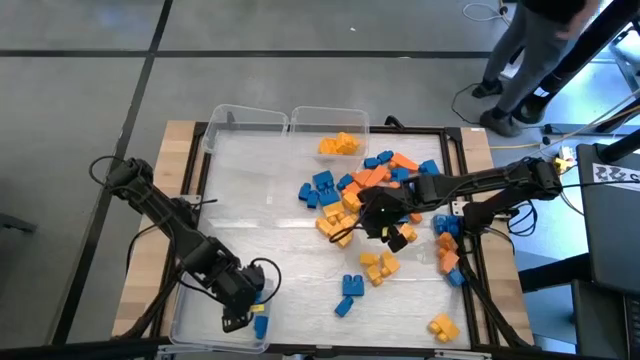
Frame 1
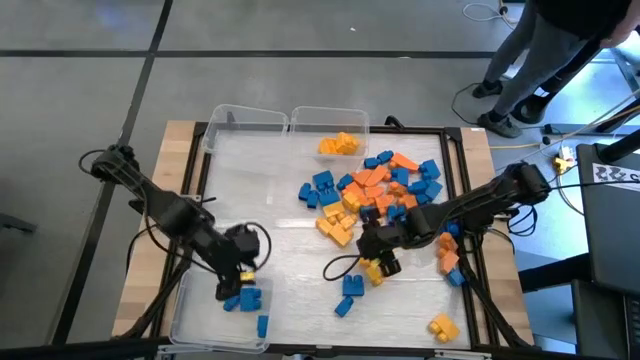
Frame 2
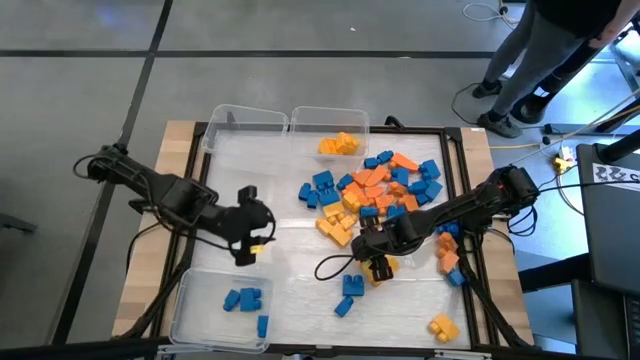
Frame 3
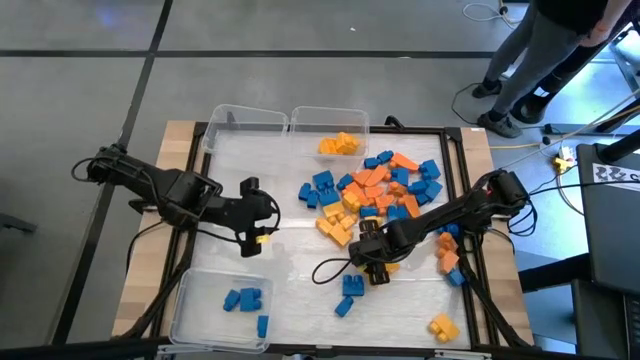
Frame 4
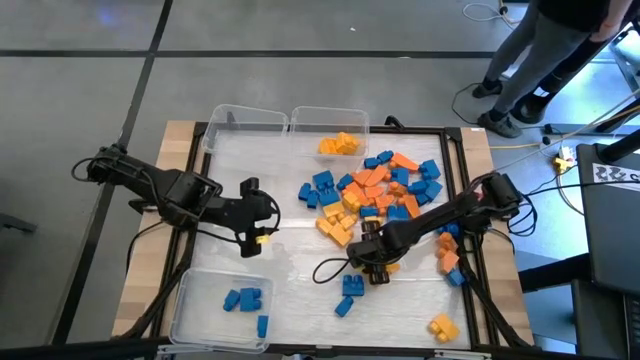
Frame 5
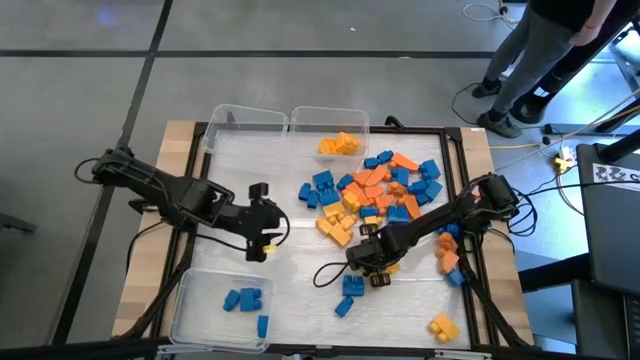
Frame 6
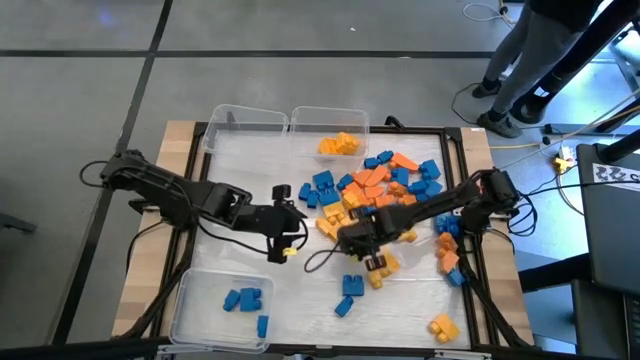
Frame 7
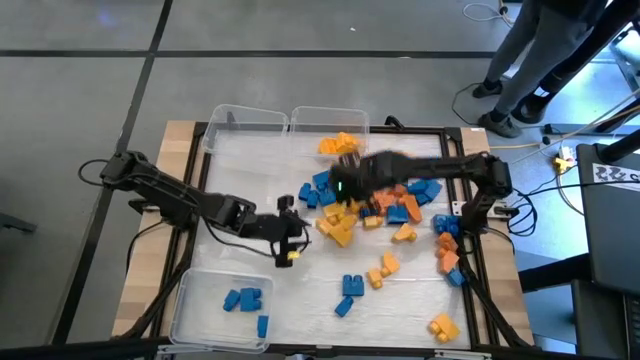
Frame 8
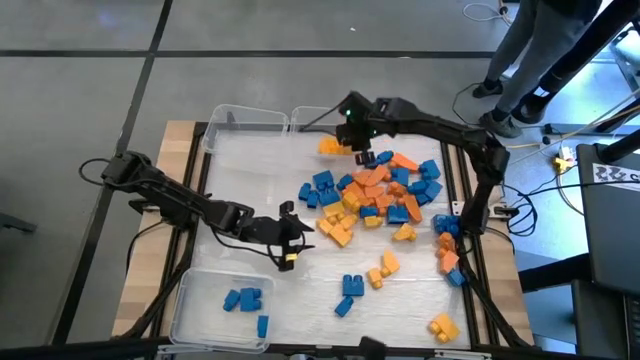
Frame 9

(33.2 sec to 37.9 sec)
Task: Sort blocks
Put the yellow game piece into the top right transparent bin

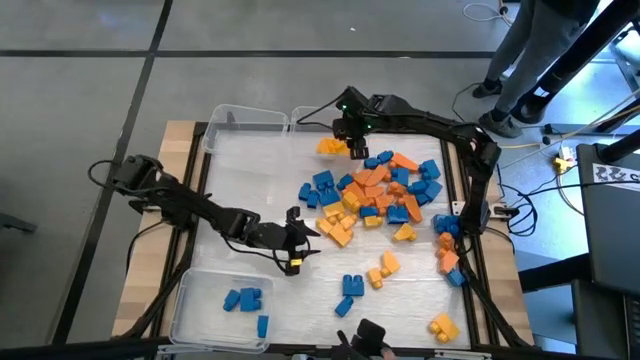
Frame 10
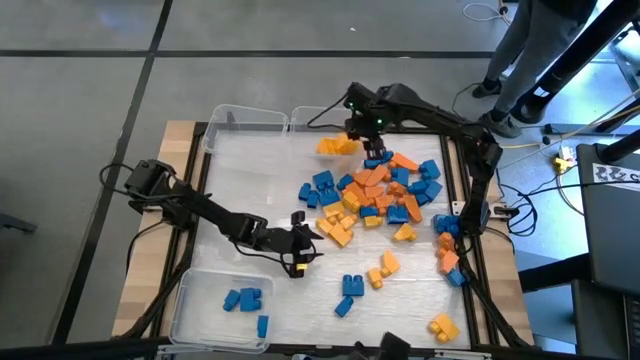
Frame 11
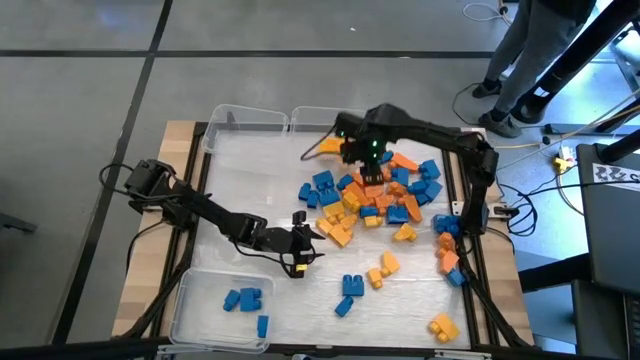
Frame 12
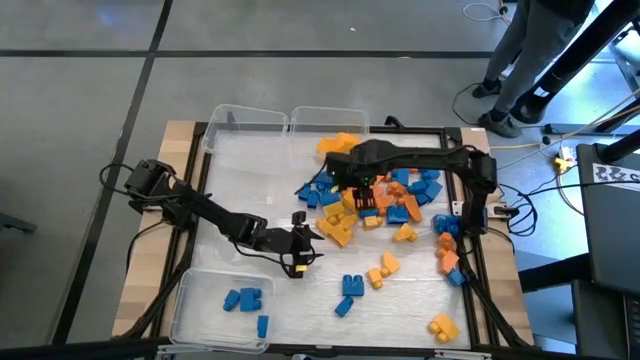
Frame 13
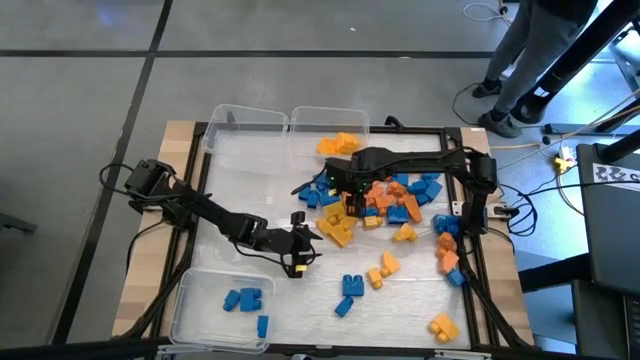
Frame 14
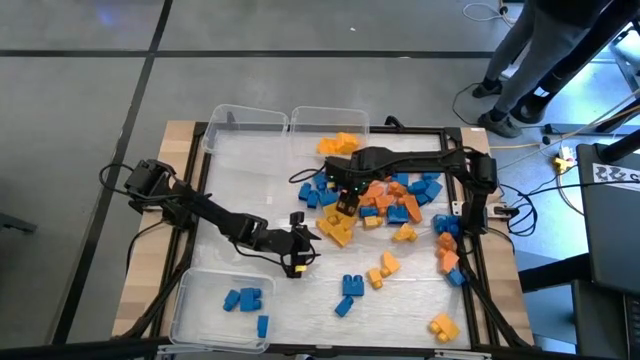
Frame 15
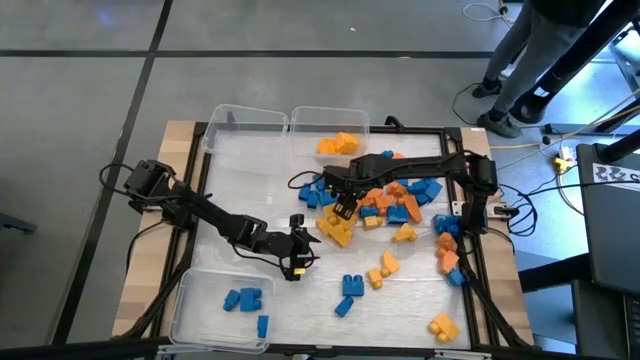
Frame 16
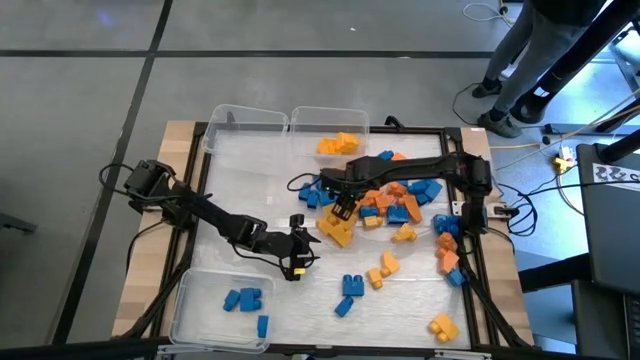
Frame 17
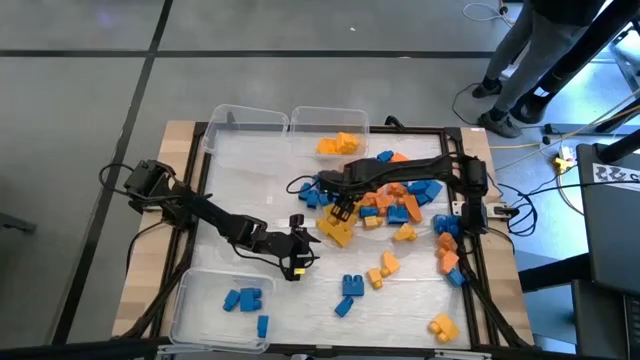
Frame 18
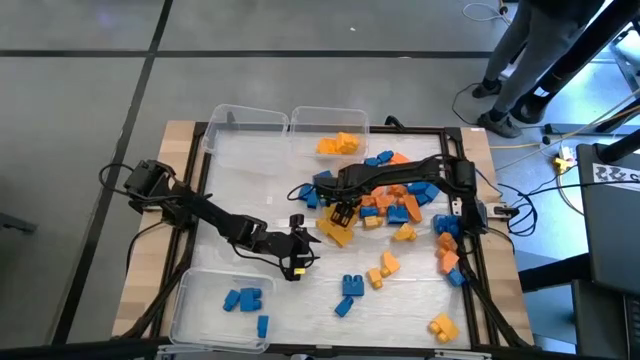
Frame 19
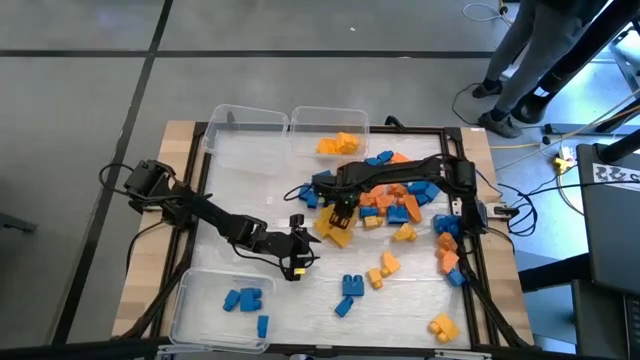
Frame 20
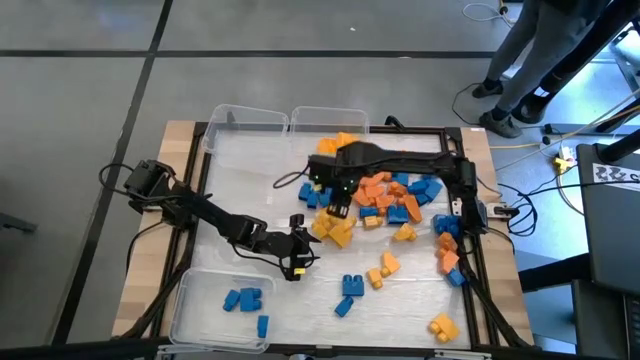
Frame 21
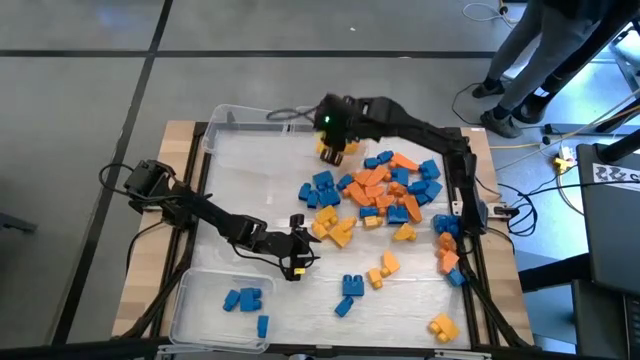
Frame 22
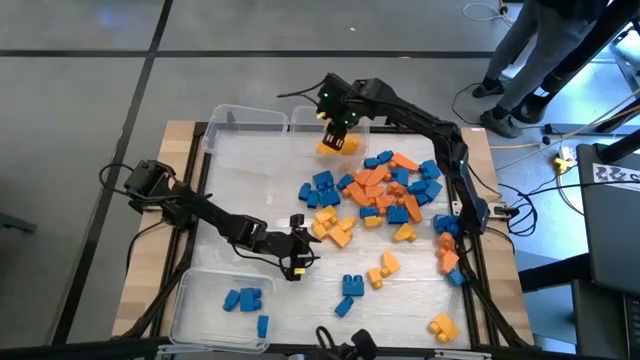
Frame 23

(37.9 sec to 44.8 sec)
Put the yellow game piece into the top right transparent bin

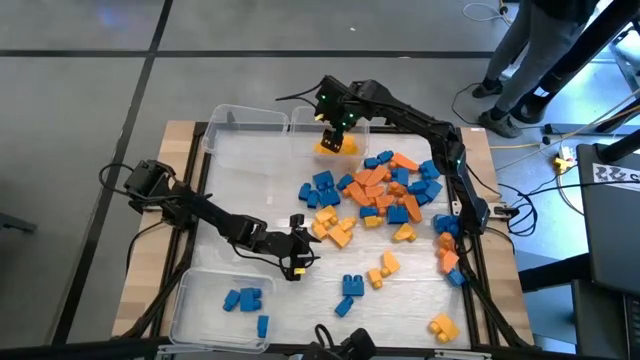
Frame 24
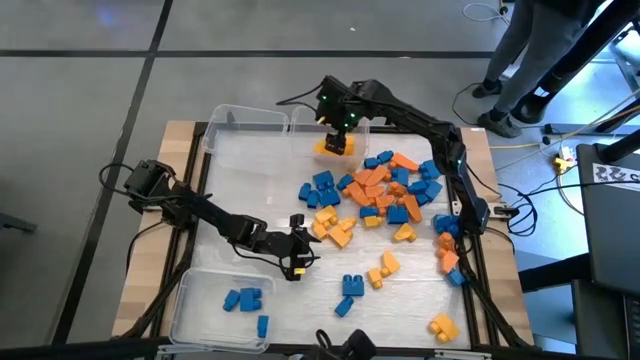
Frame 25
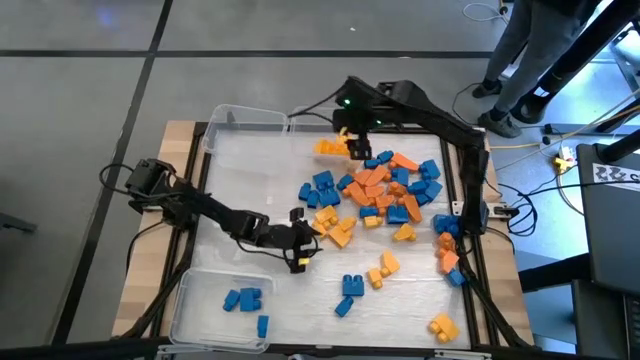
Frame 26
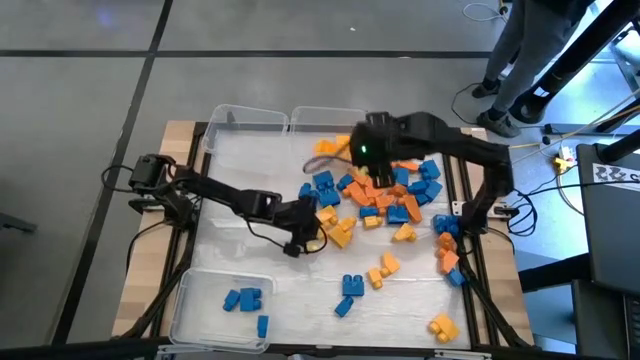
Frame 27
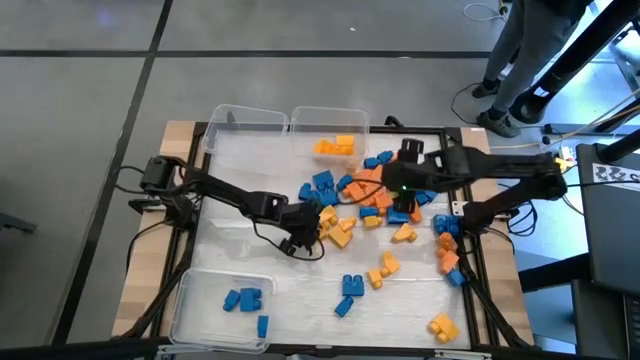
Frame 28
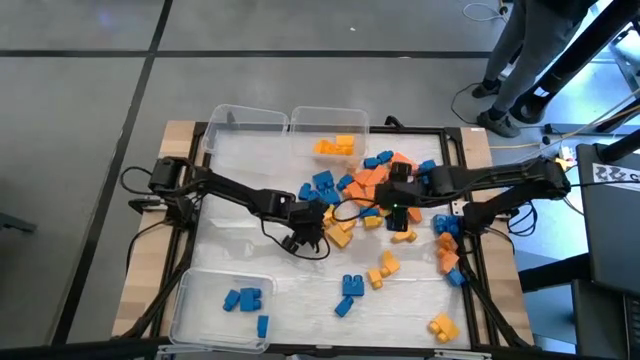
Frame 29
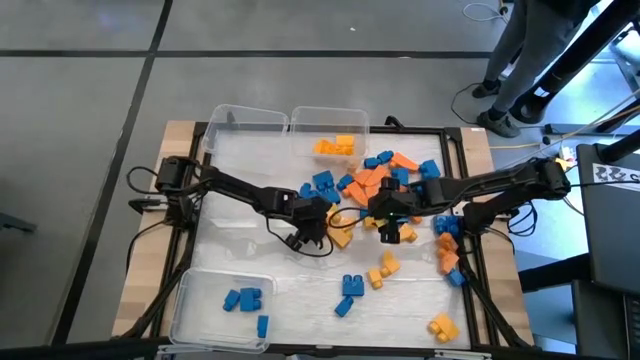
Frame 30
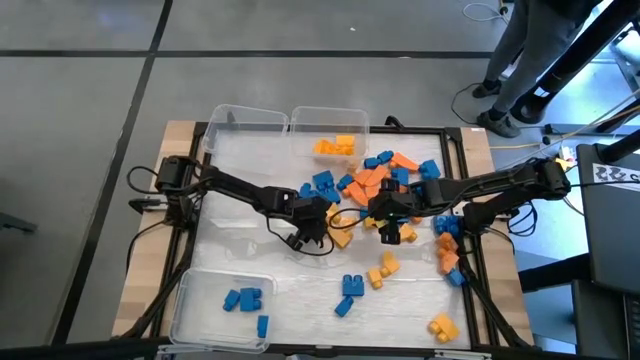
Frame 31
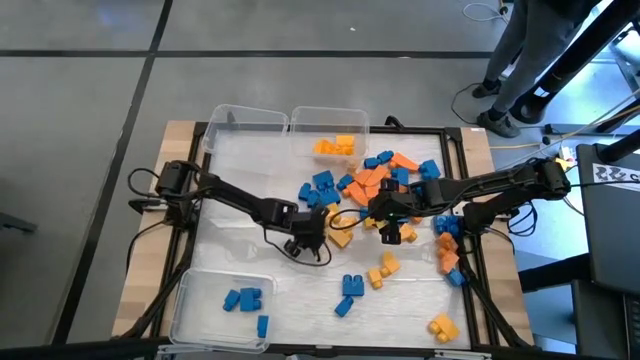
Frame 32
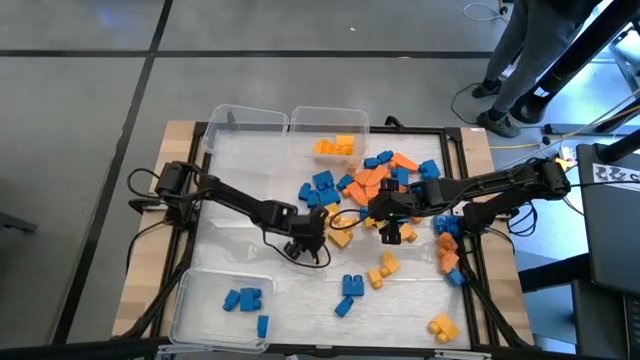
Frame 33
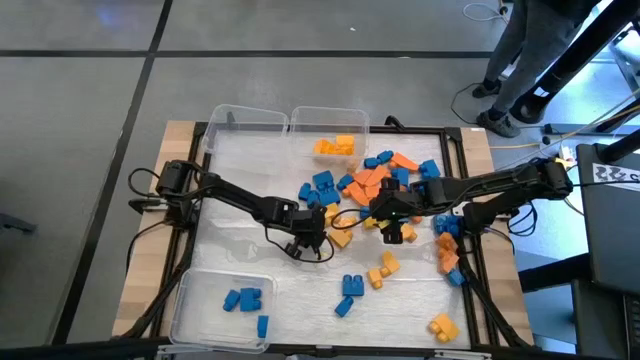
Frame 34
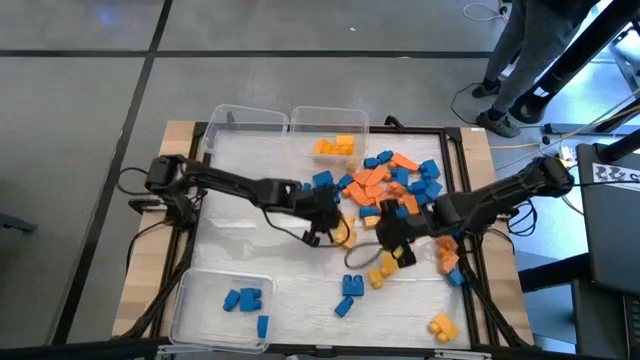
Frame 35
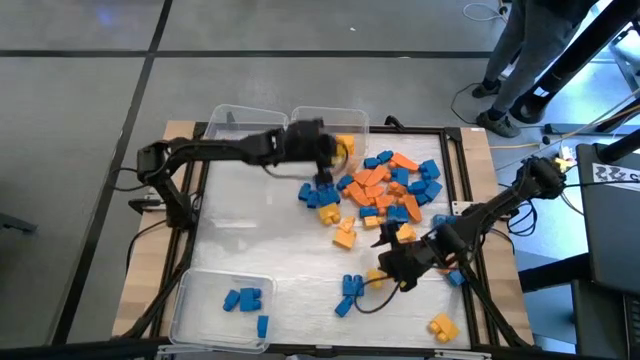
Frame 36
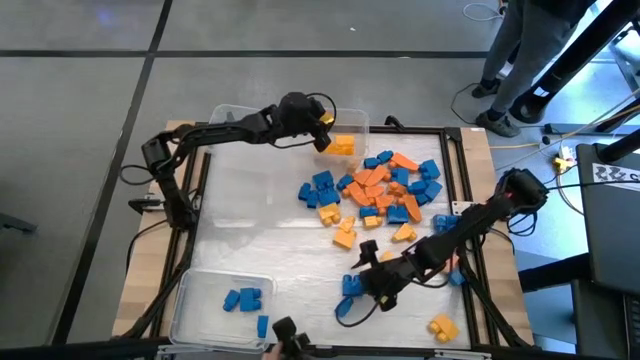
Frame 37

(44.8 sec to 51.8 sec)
Put the yellow game piece into the top right transparent bin

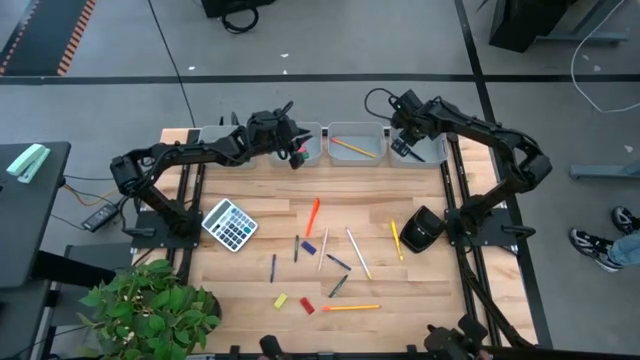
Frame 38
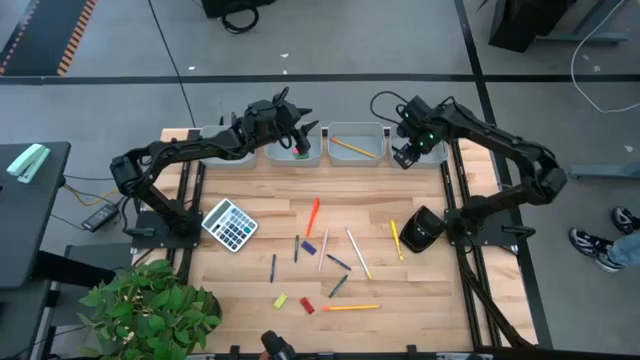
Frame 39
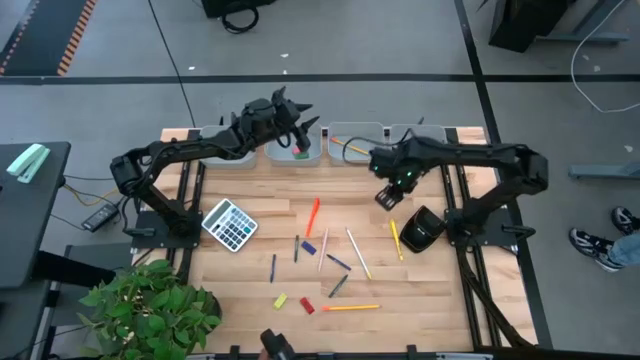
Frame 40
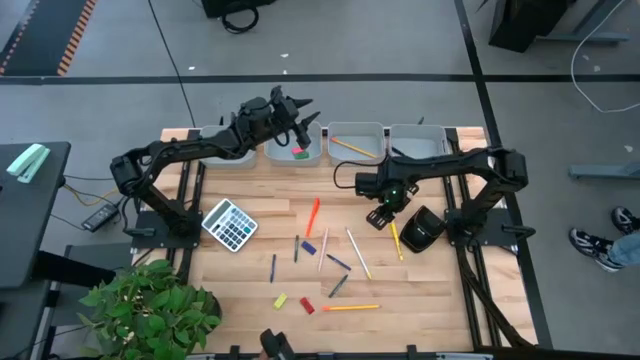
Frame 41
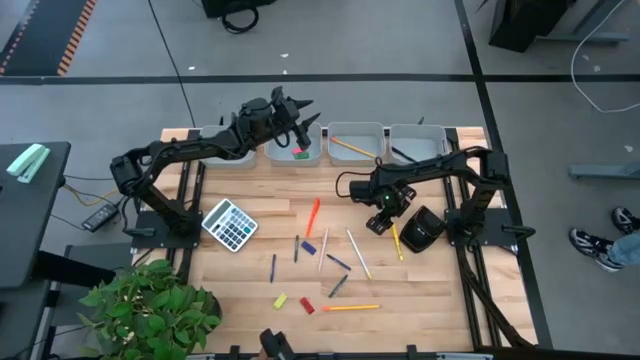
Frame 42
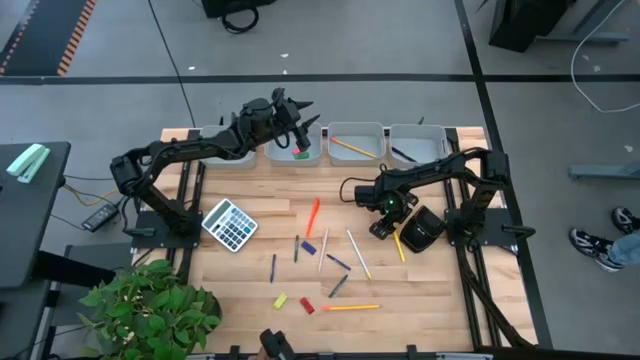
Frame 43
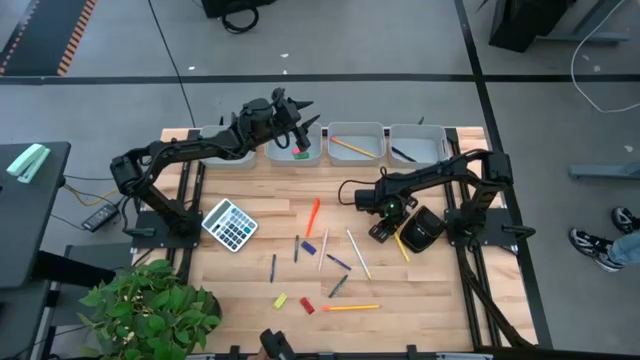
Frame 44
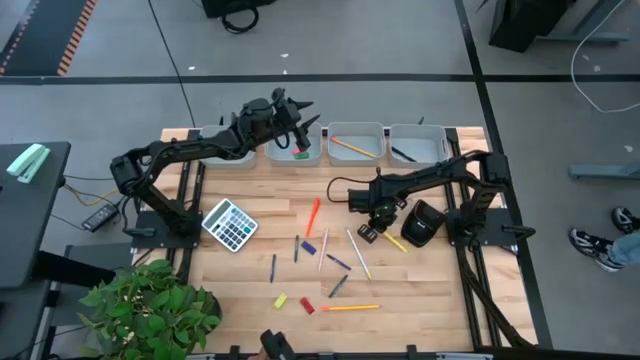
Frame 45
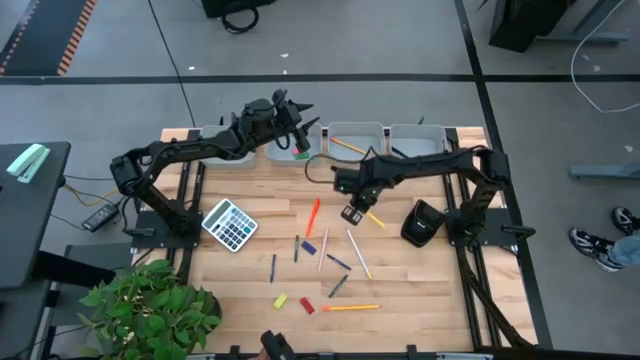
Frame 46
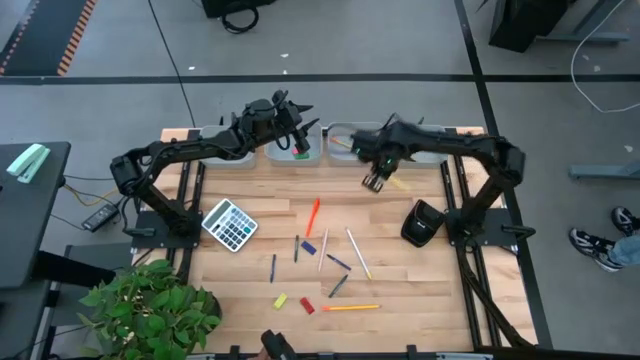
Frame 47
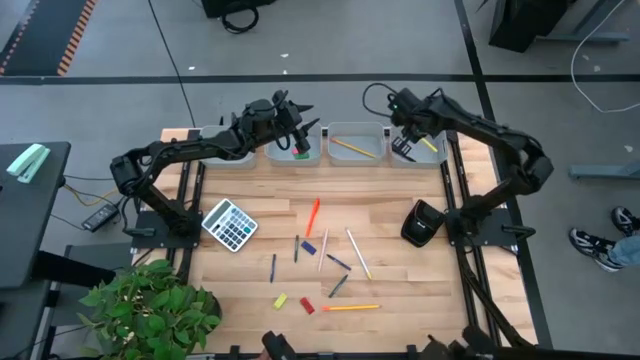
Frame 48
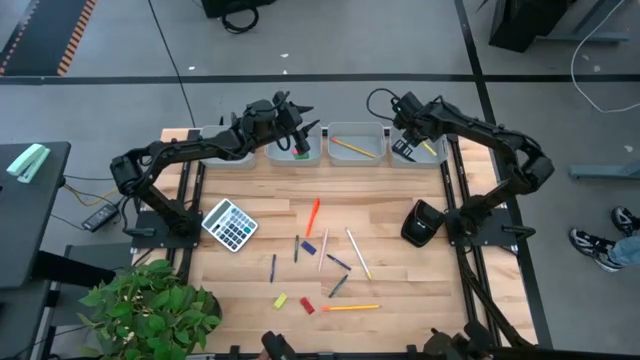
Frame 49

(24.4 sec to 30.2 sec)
Task: Sort crayons/erasers/pens/pencils in bins
Put the yellow pen into the gray bin
